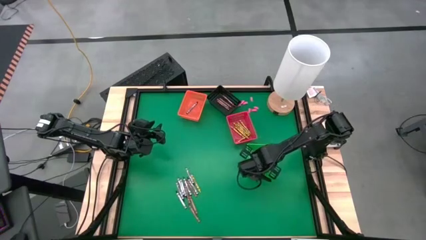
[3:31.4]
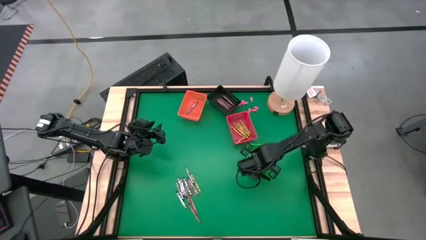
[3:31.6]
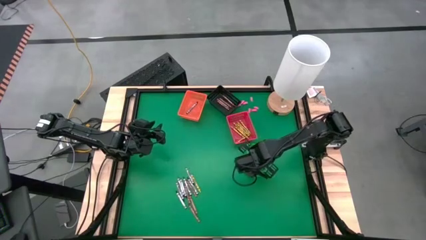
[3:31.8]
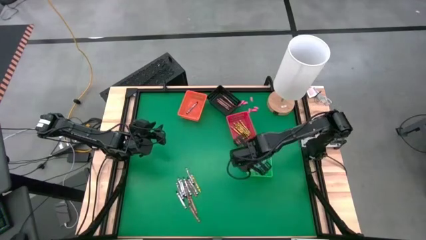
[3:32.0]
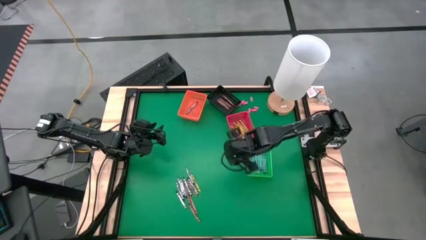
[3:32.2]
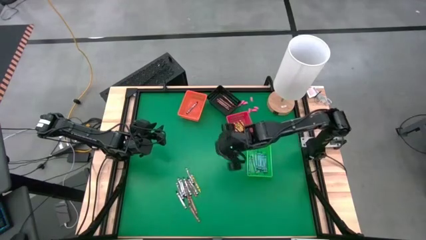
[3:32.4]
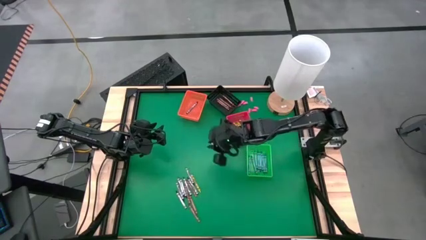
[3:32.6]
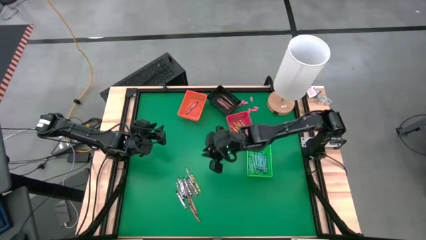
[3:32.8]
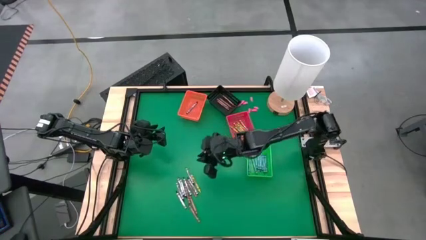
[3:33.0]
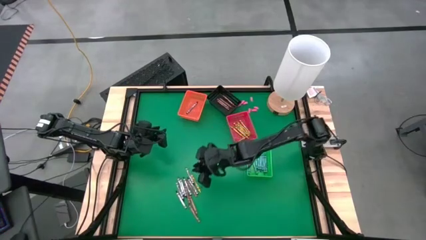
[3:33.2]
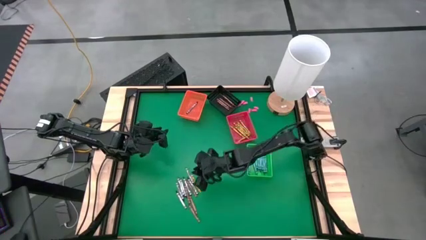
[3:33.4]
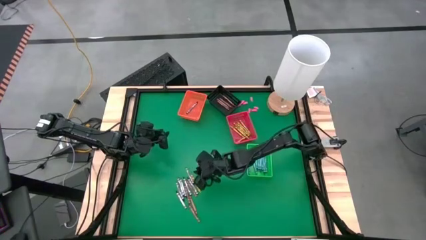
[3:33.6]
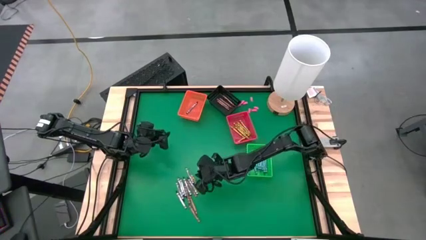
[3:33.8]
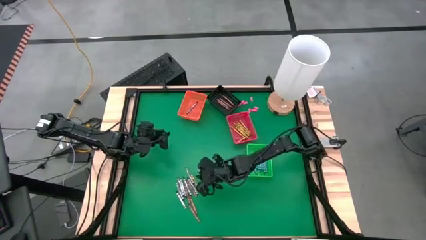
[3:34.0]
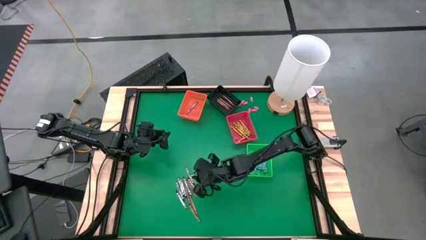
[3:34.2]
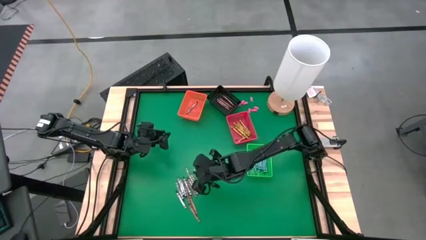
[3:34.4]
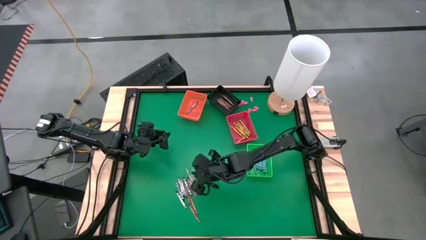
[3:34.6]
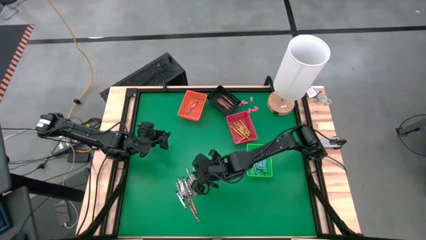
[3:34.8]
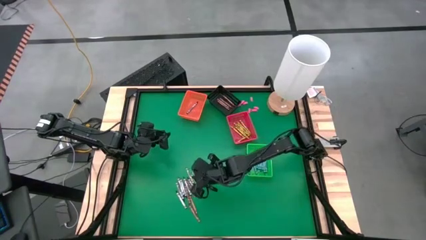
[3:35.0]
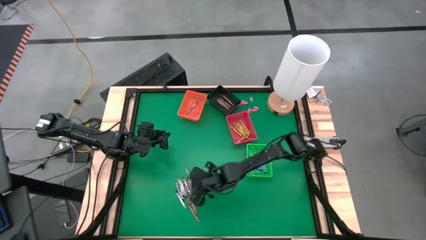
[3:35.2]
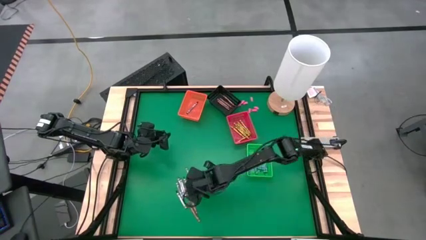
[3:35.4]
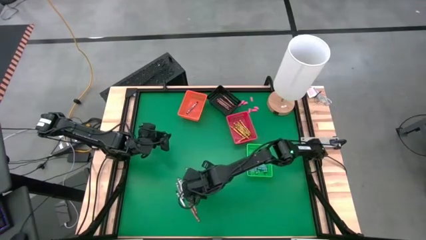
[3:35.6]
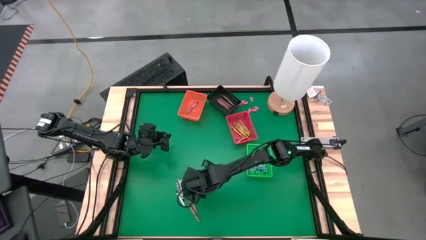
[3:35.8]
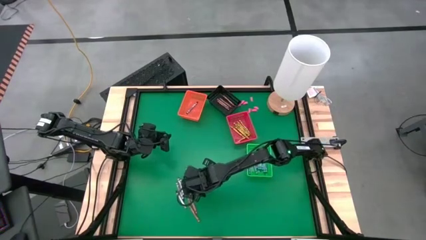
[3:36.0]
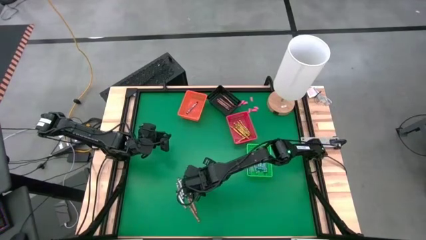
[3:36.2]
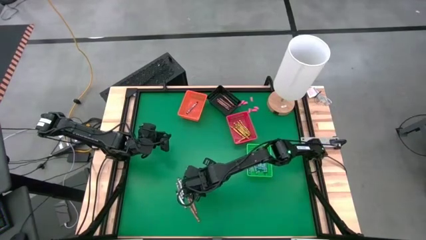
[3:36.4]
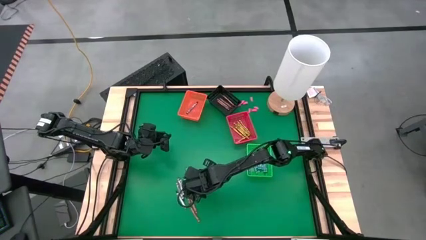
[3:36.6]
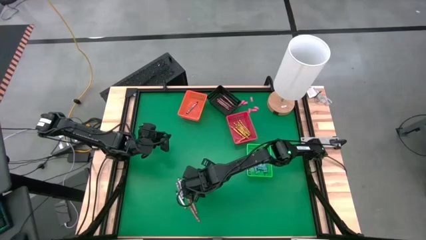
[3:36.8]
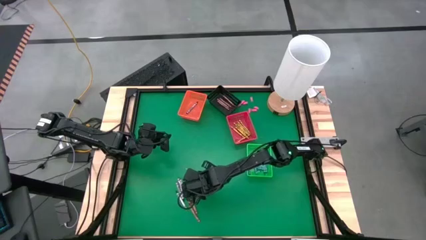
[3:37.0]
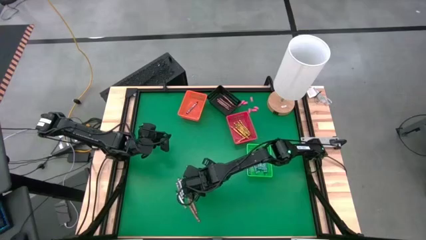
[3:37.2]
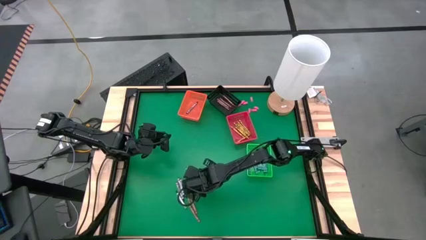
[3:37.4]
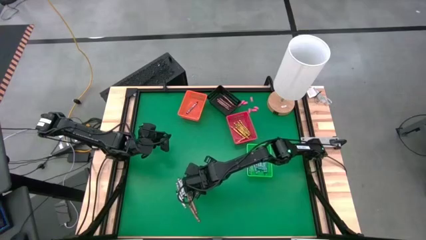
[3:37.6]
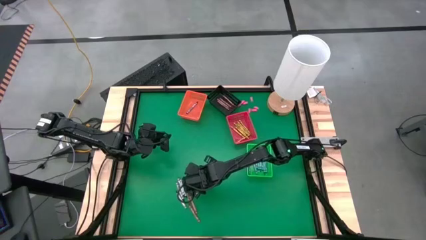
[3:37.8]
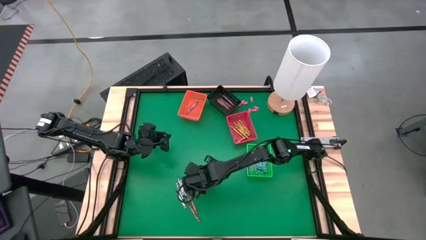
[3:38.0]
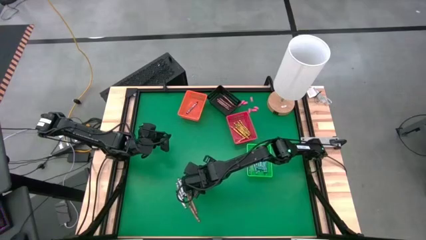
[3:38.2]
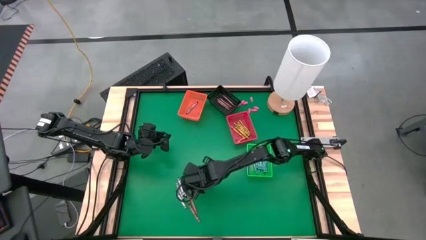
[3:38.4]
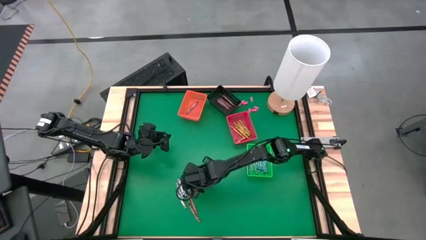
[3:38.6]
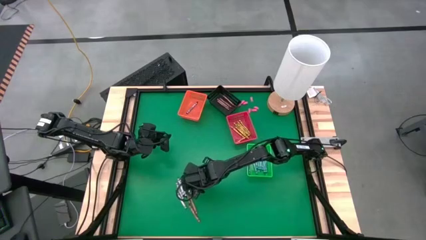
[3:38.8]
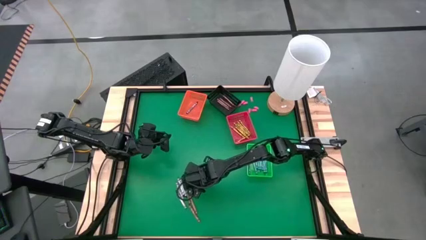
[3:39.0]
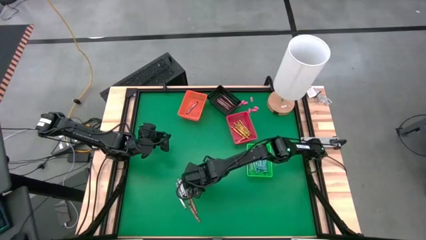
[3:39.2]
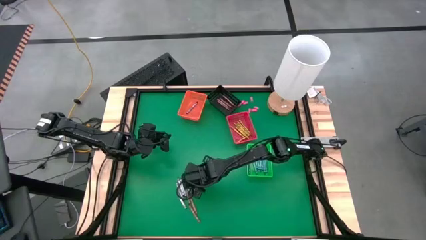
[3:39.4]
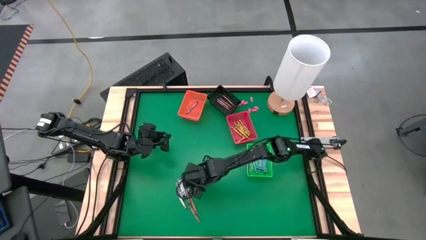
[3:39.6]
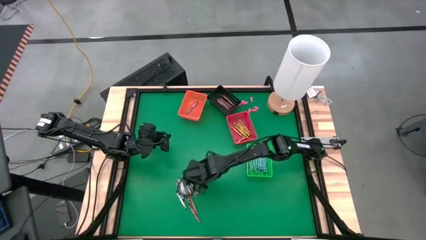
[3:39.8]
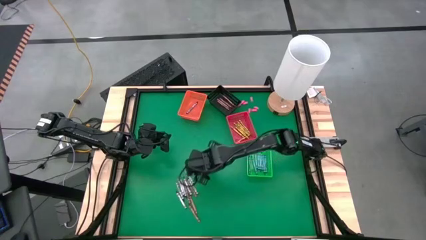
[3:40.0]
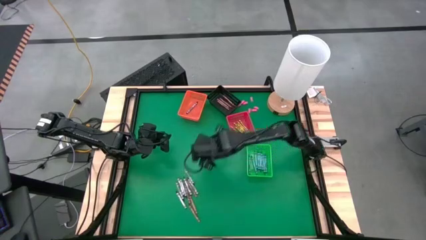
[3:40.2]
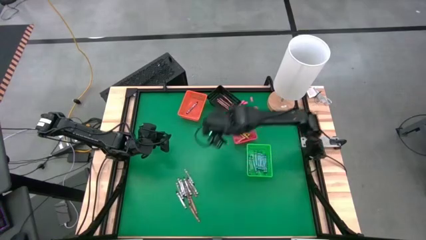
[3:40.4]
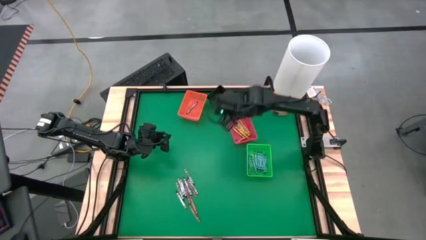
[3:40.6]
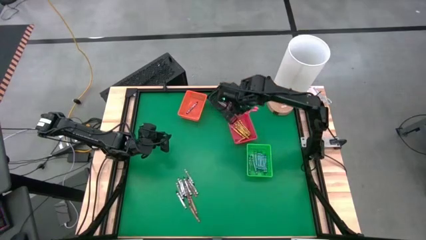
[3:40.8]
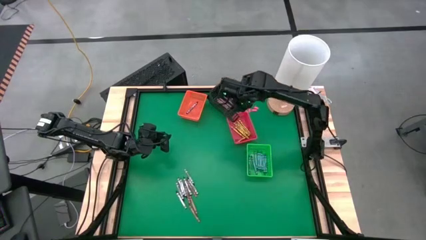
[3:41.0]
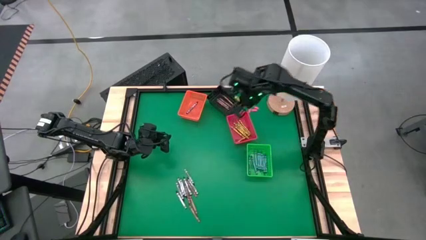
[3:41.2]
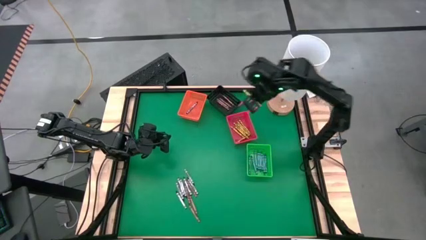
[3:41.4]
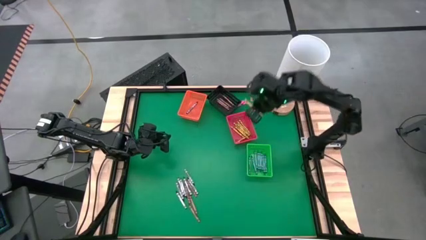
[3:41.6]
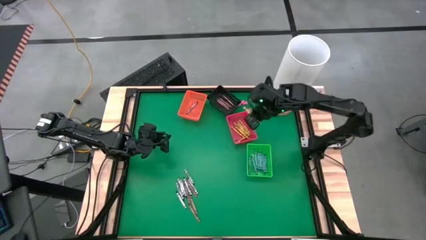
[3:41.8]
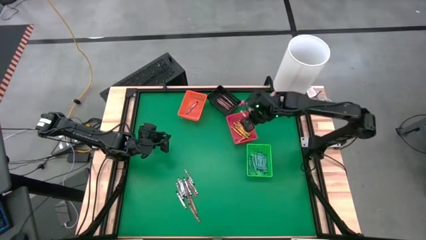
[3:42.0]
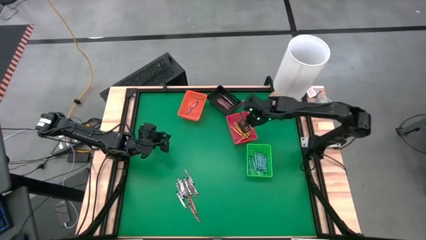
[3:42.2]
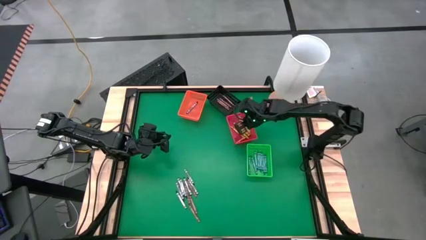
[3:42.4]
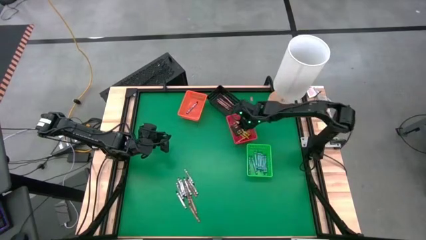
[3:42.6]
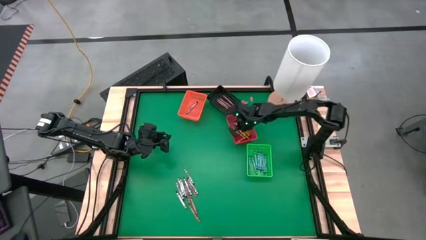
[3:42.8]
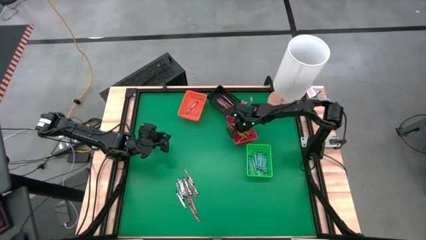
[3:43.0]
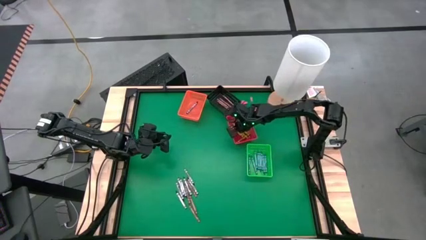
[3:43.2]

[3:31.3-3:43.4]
Task: Sort crayons
Put the yellow crayon into the red bin
